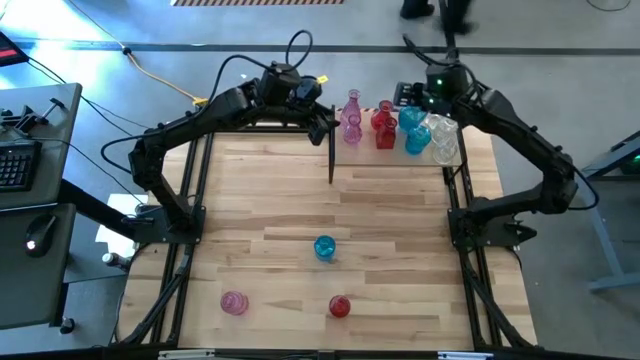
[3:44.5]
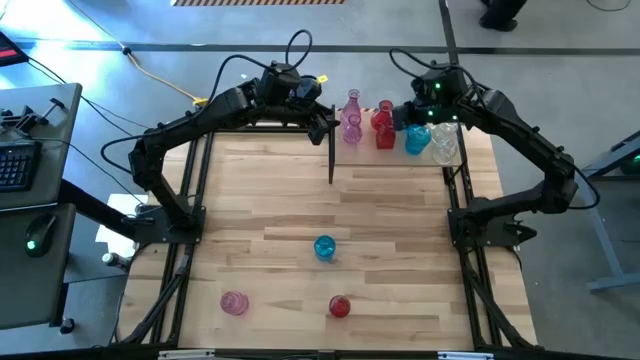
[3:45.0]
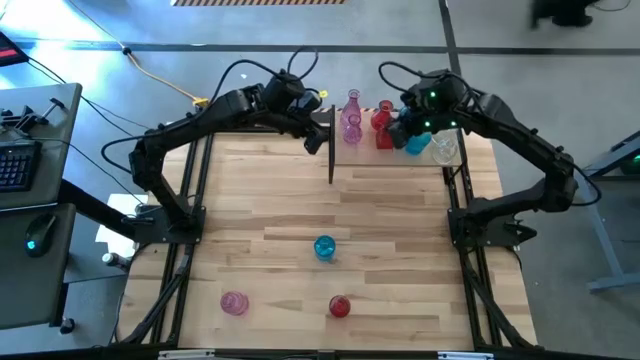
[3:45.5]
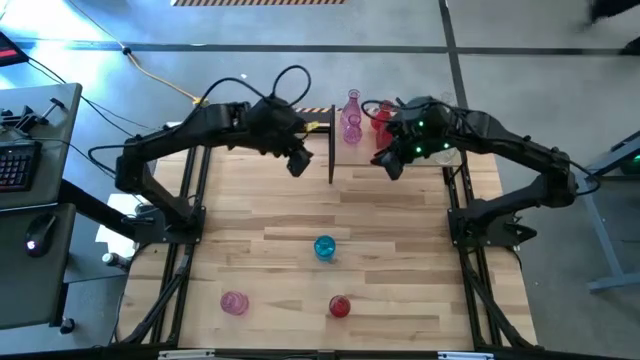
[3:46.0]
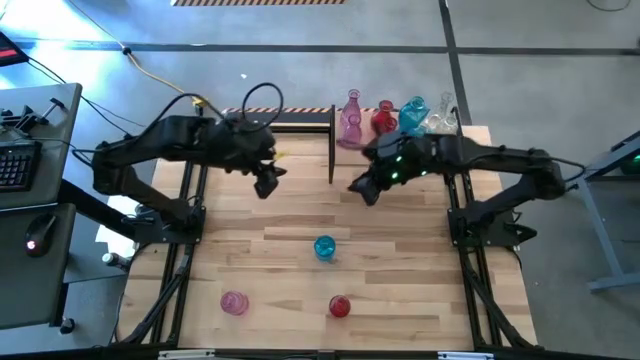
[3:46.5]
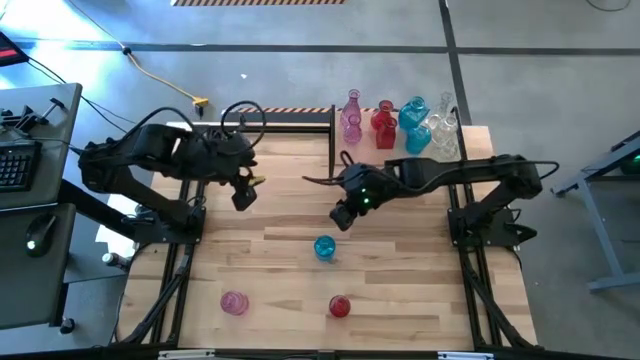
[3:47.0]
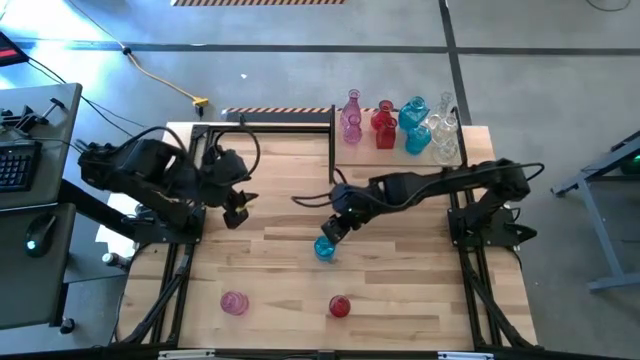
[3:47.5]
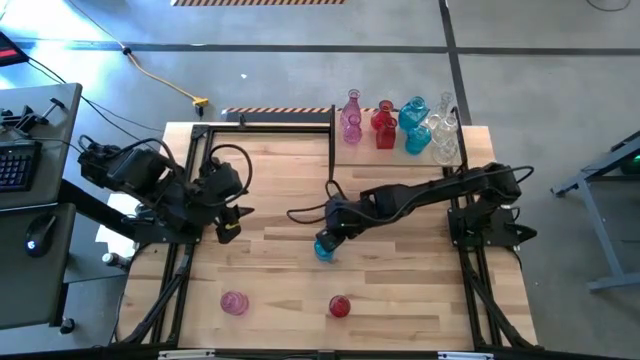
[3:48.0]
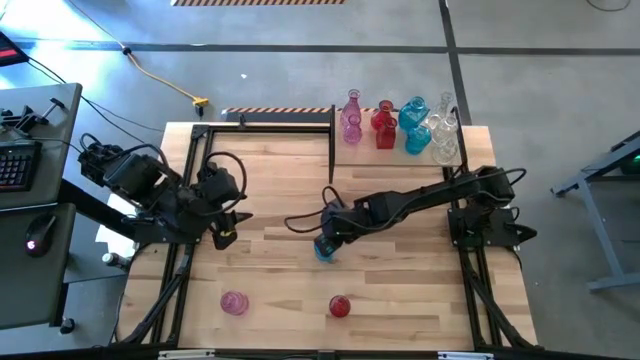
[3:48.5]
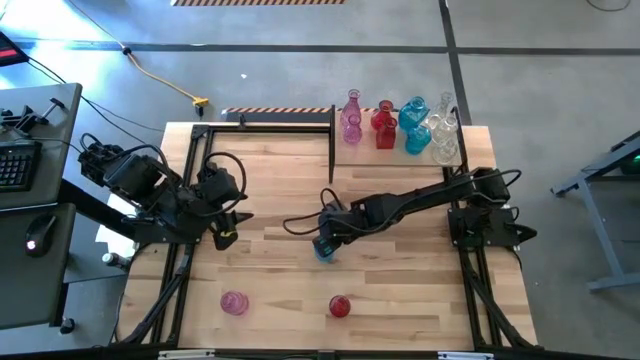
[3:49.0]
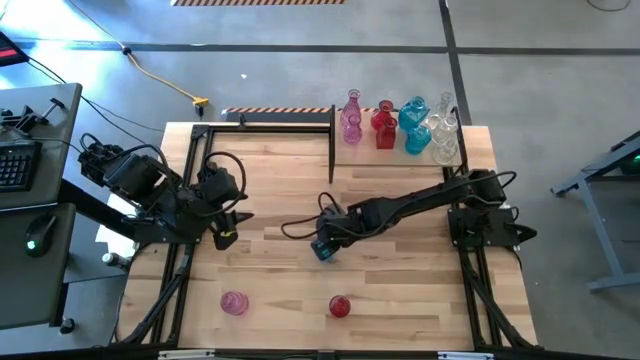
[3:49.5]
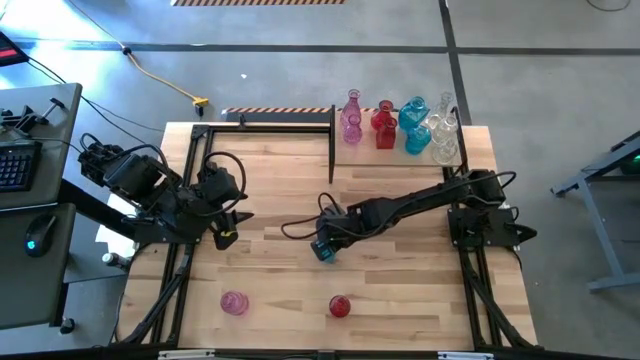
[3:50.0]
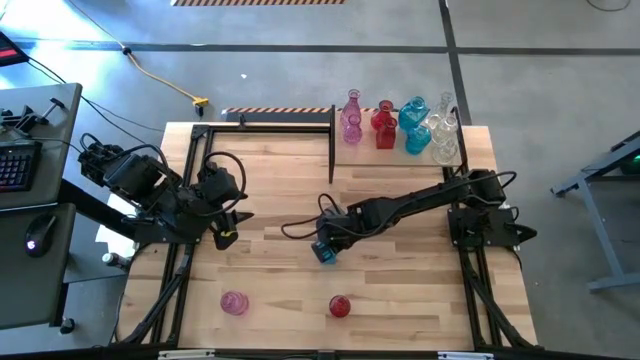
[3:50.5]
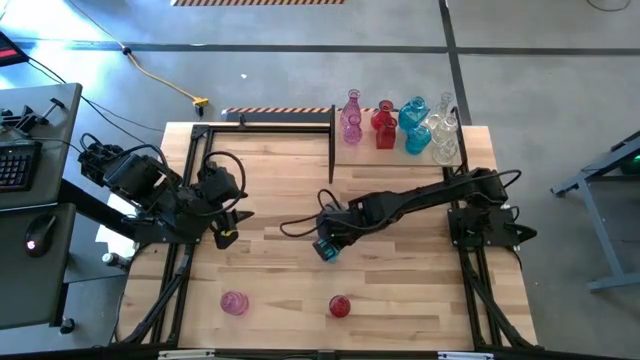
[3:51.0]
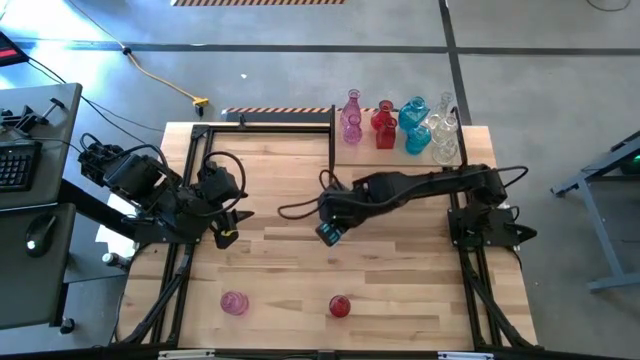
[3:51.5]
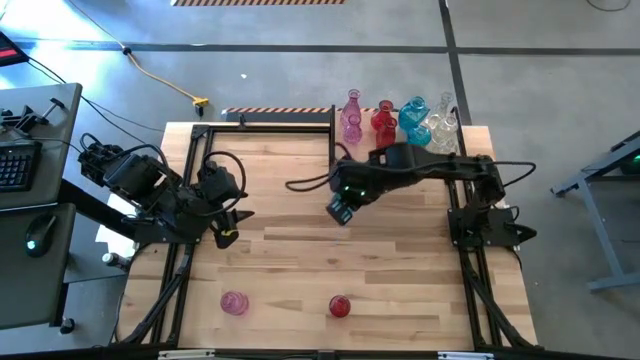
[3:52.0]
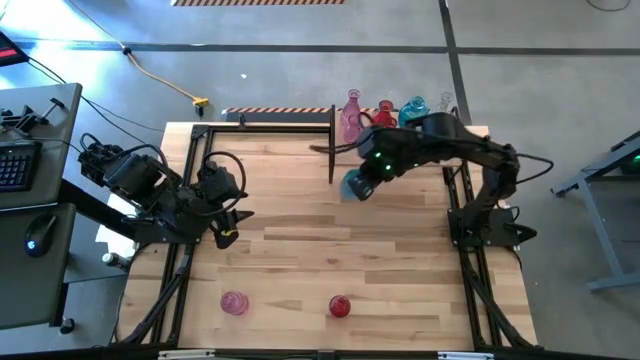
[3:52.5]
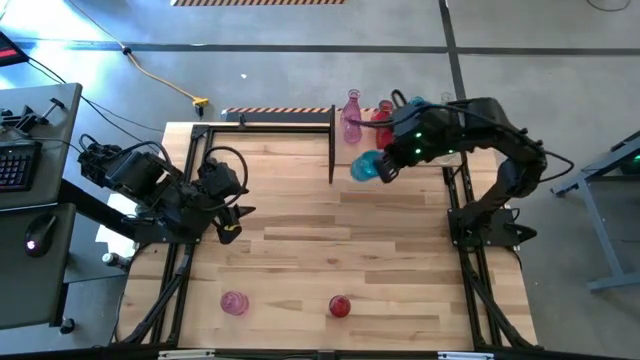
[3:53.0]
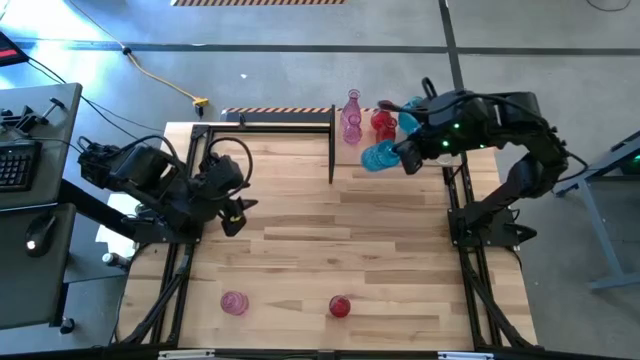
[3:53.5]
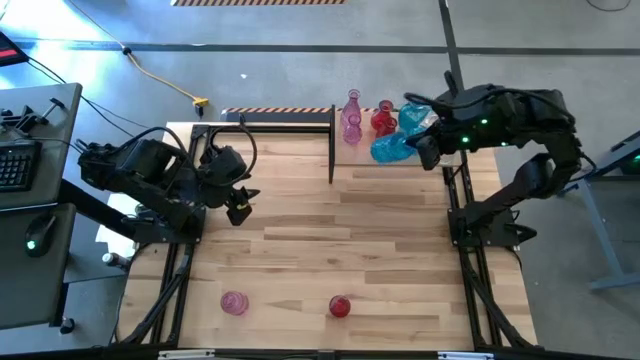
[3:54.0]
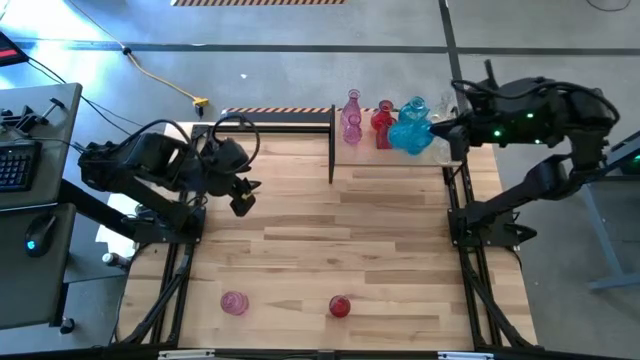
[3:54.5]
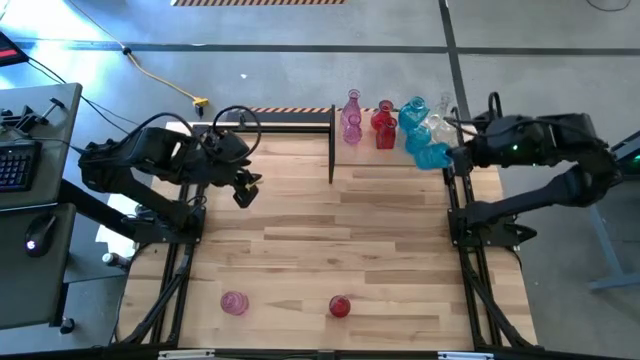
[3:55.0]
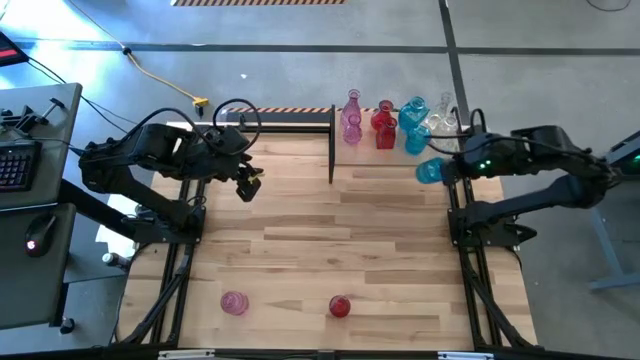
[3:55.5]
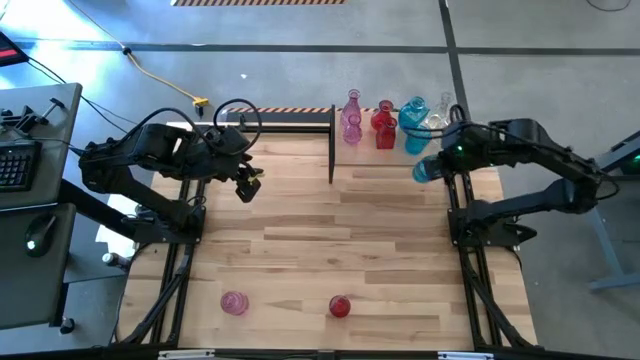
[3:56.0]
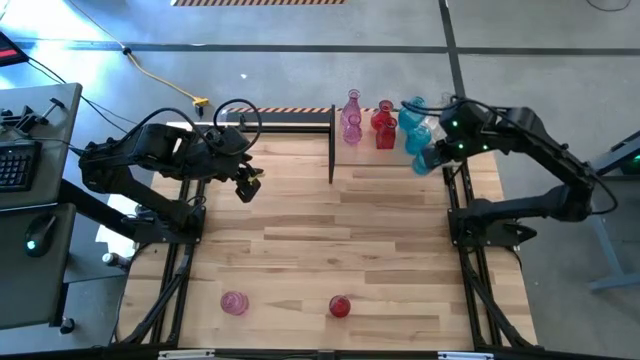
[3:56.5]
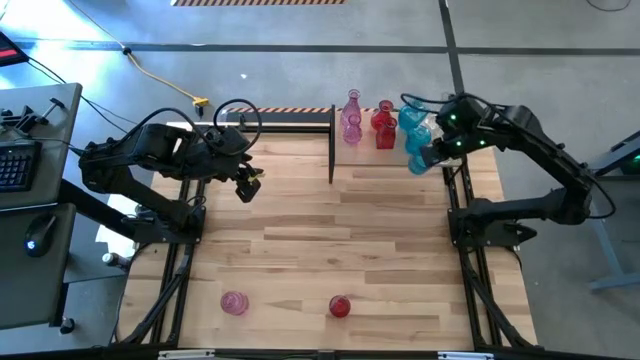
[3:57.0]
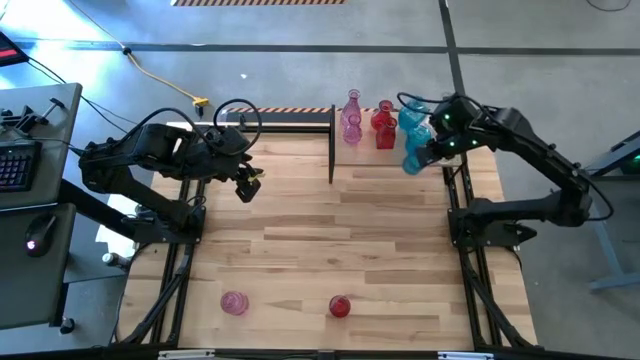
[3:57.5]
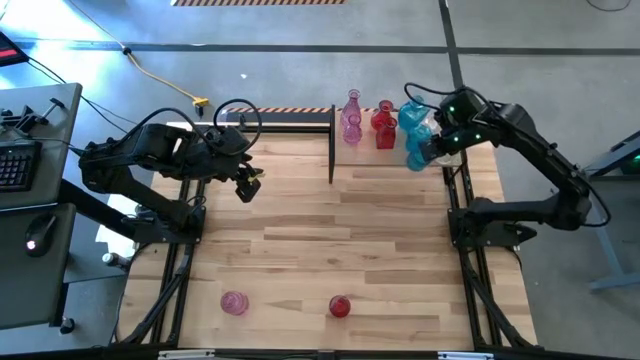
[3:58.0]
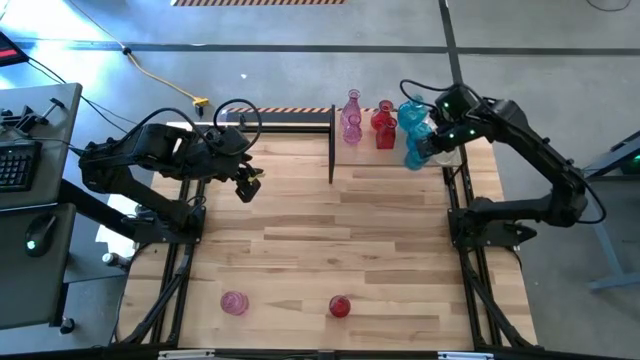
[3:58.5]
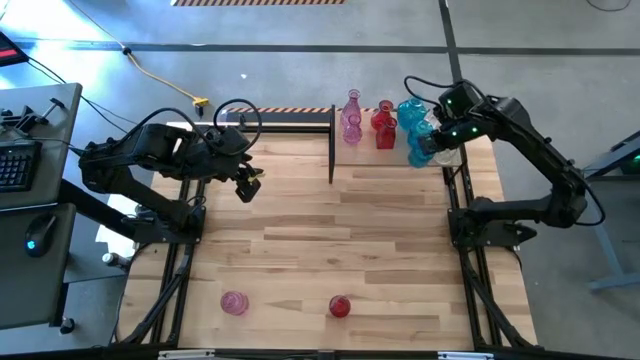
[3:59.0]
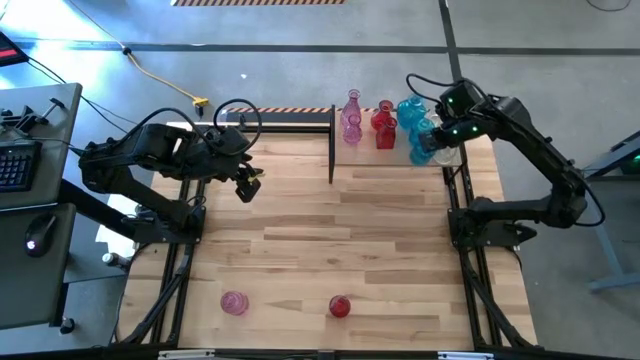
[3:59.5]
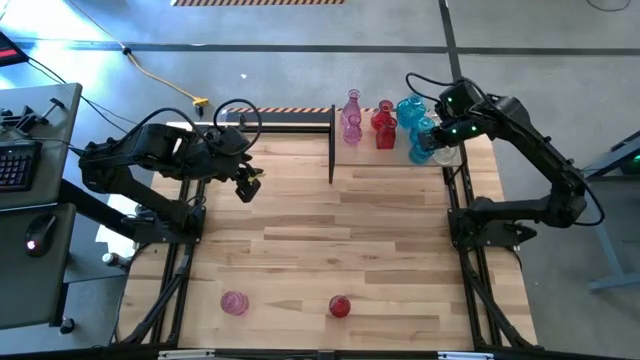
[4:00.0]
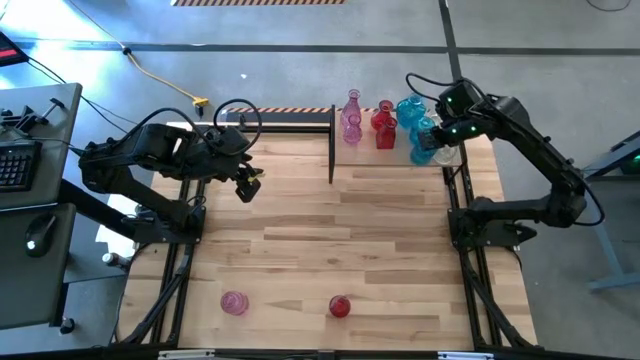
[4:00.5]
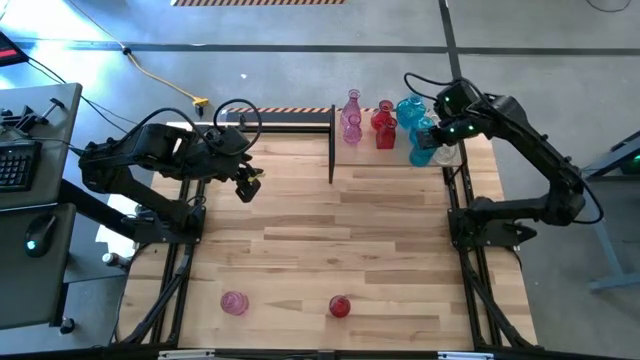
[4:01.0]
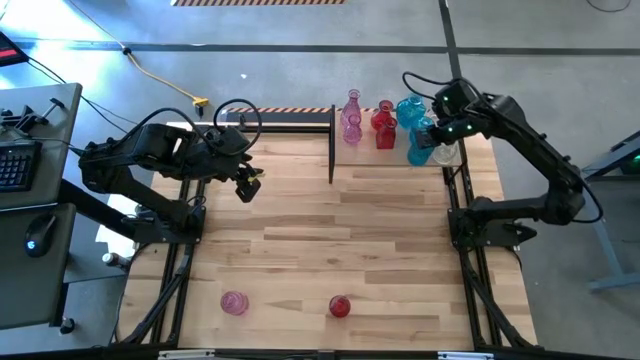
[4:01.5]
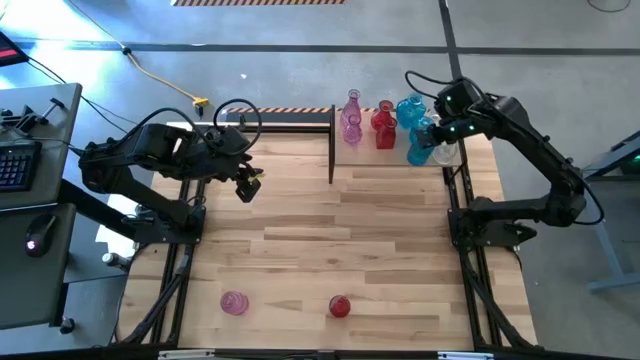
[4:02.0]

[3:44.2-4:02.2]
Task: sort vases onto shelf
Put the blue vase on the shelf aligned with the blue vases

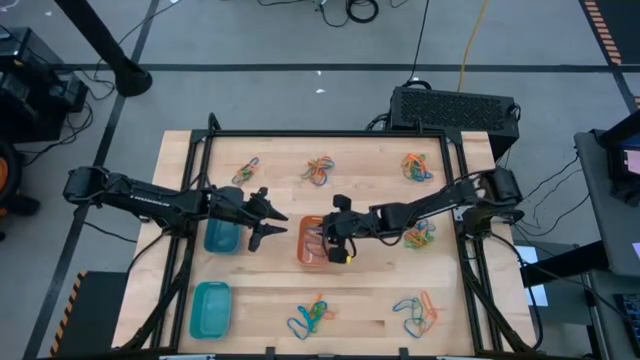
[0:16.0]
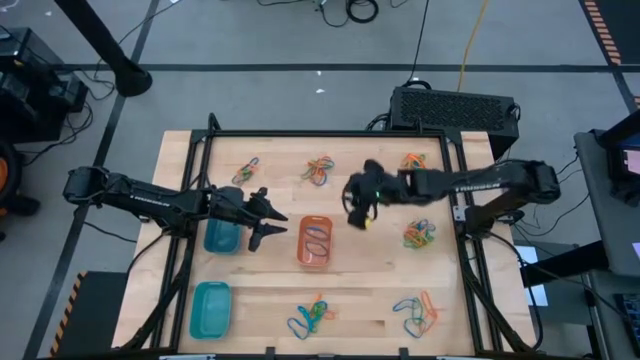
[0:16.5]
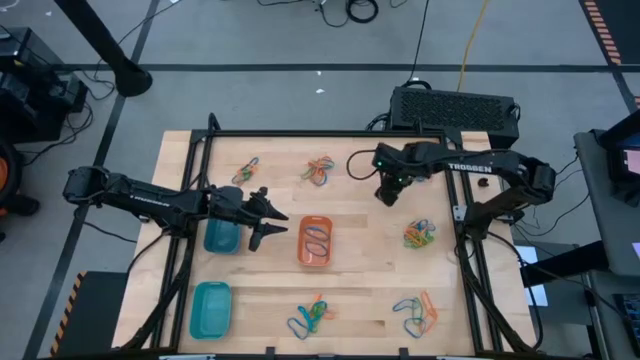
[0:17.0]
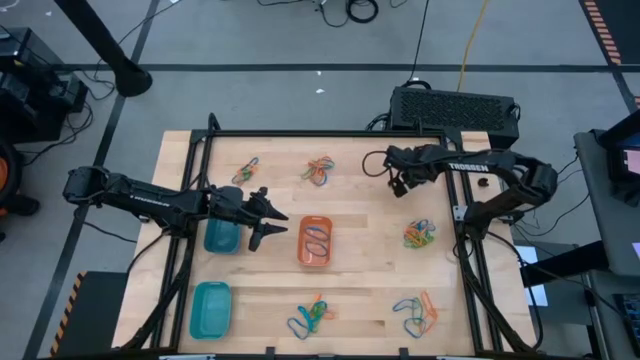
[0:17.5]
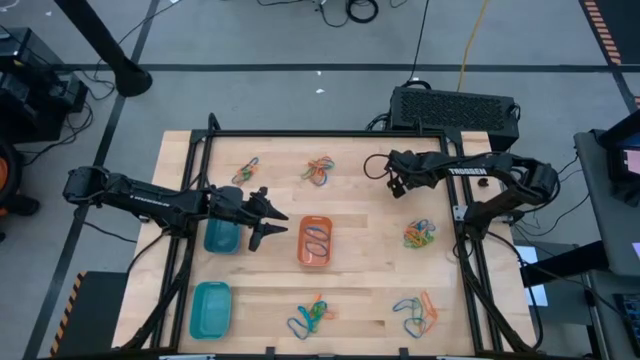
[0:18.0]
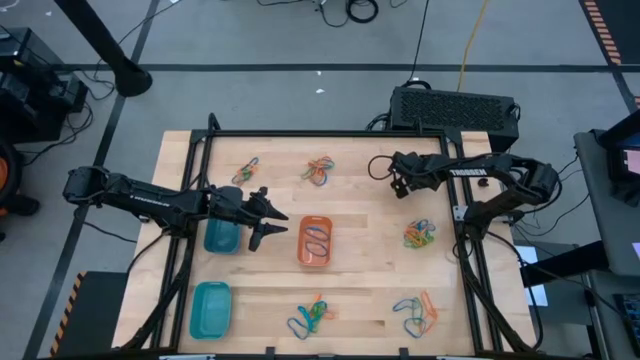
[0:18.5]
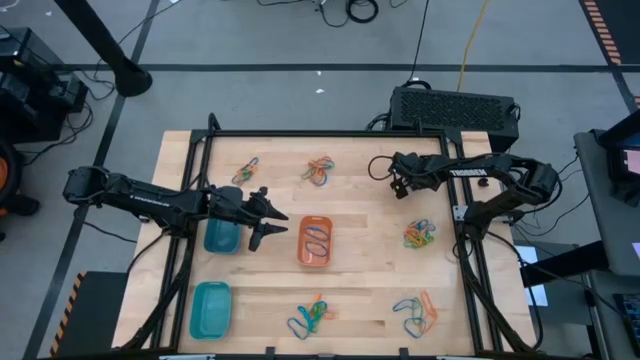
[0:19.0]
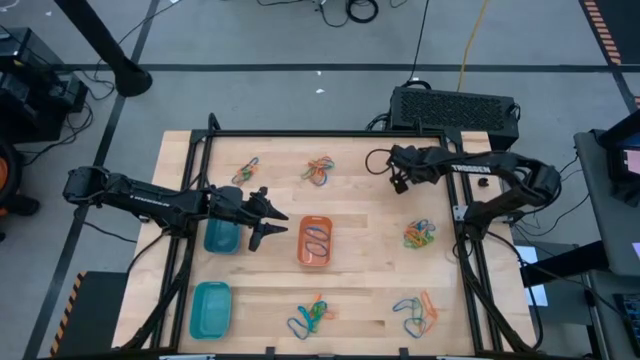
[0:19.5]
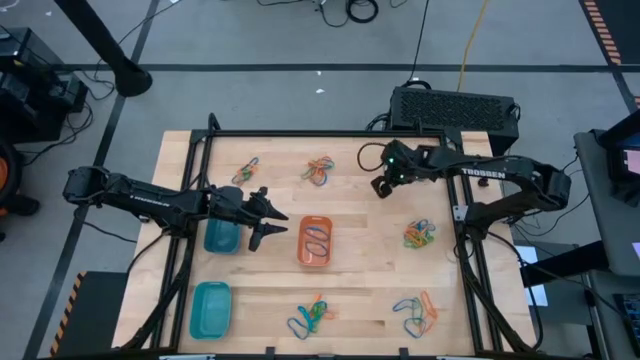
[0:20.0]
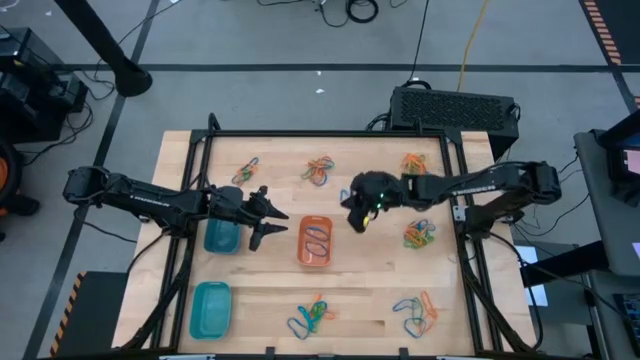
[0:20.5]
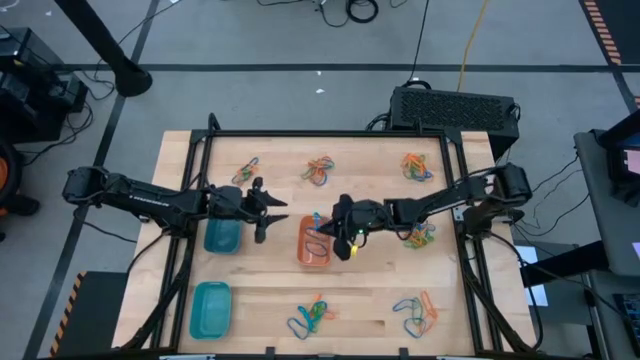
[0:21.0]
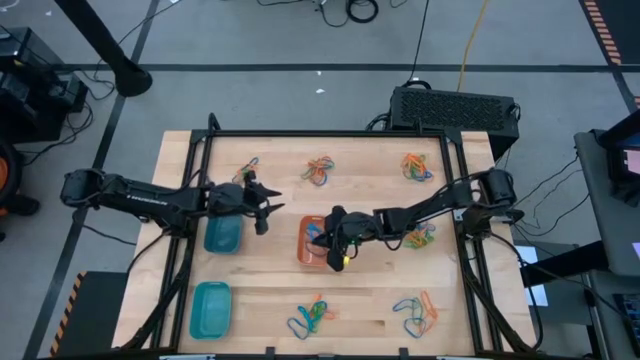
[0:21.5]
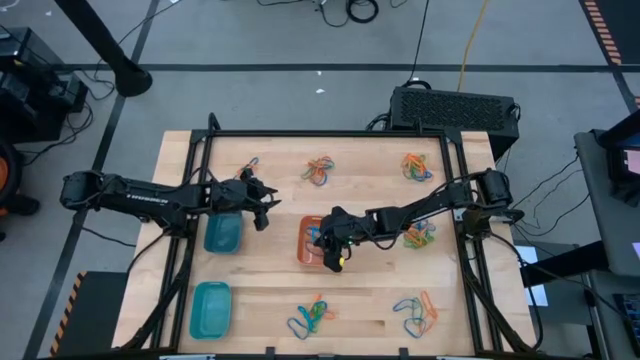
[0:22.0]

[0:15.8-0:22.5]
Task: Sort rubber bands into baskets
Put the blue rubber band into the orange bin
